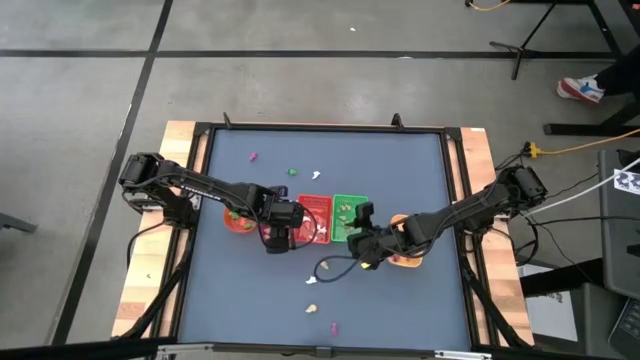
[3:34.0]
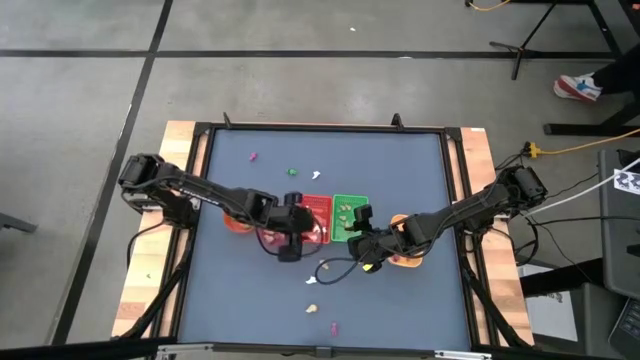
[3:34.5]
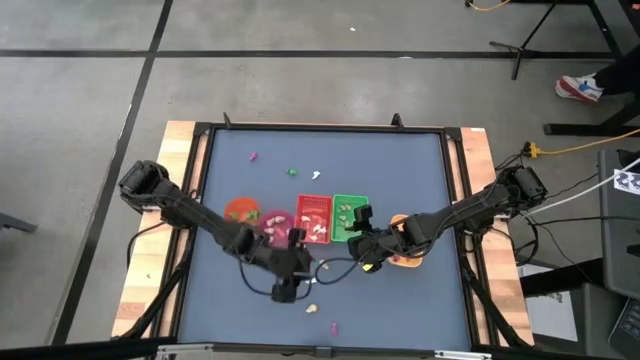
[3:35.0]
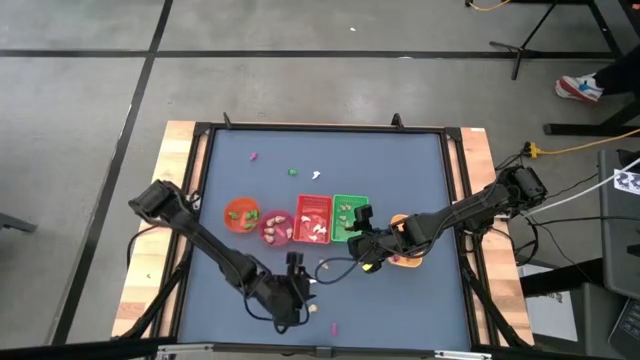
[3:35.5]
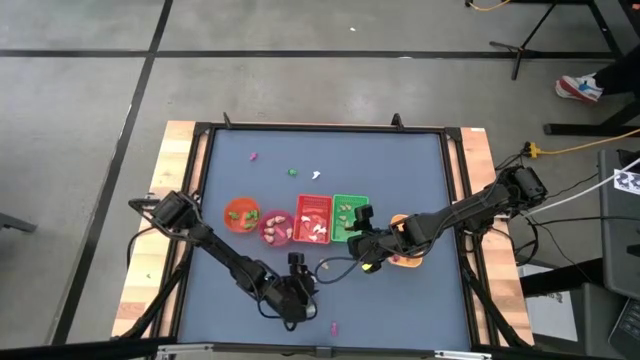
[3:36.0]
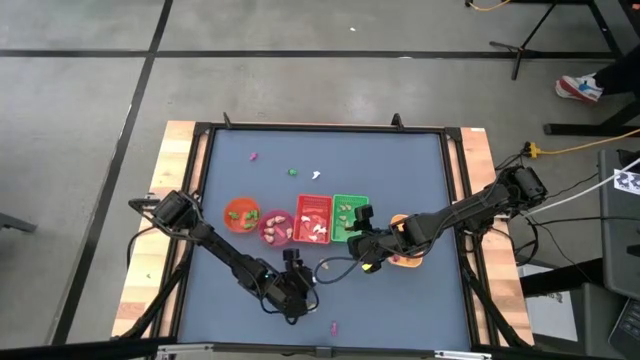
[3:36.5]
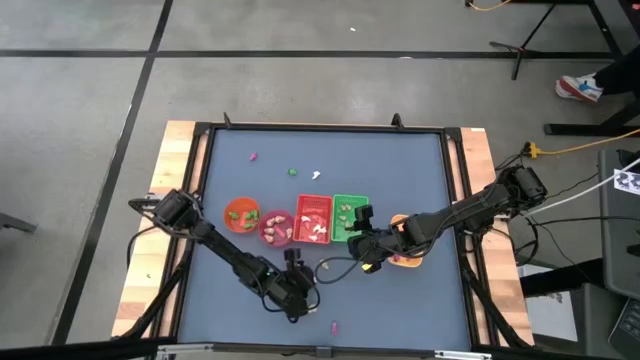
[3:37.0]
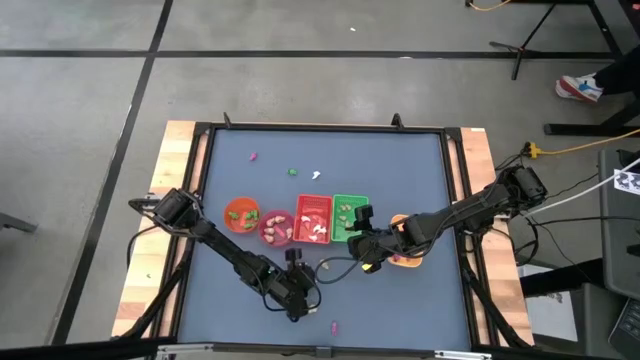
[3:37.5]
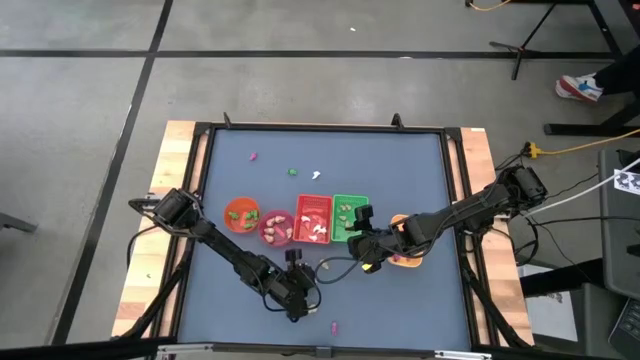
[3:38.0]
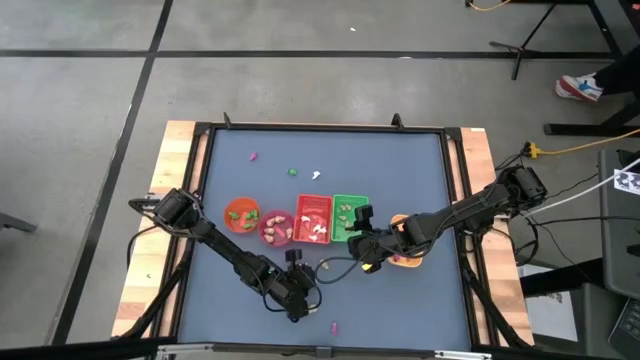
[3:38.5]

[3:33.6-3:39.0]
Task: Sort Halloween decoration
Put the white ghost toy into the red bin

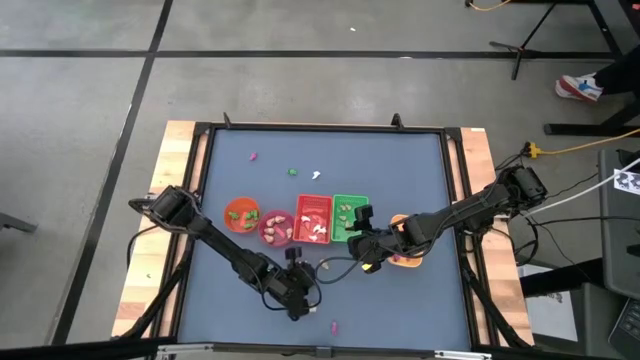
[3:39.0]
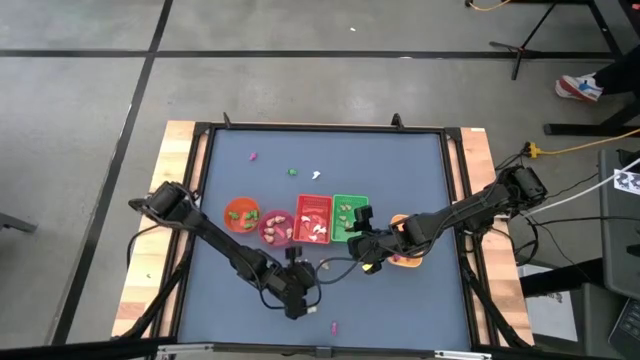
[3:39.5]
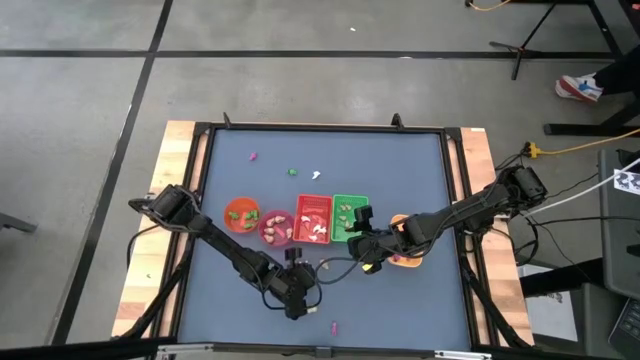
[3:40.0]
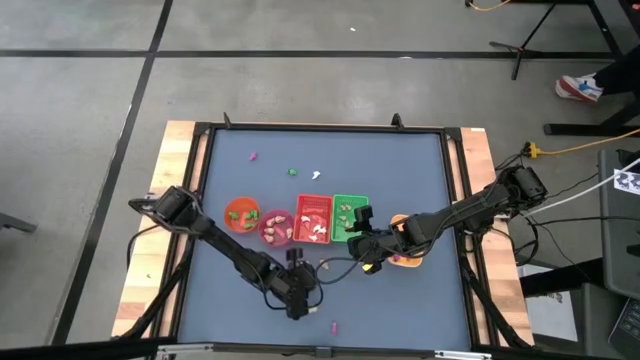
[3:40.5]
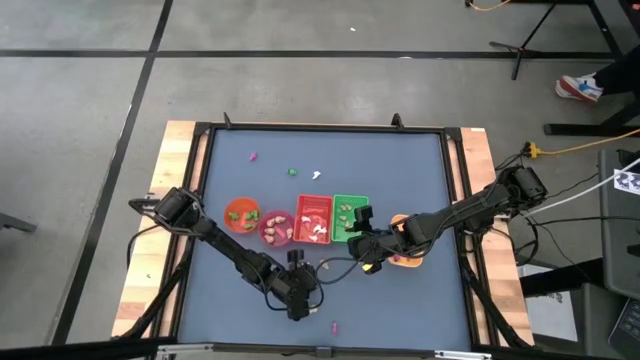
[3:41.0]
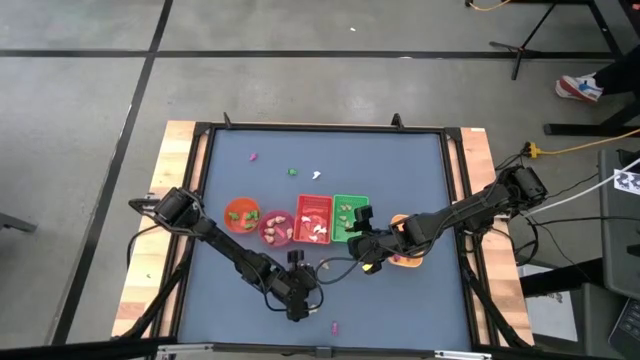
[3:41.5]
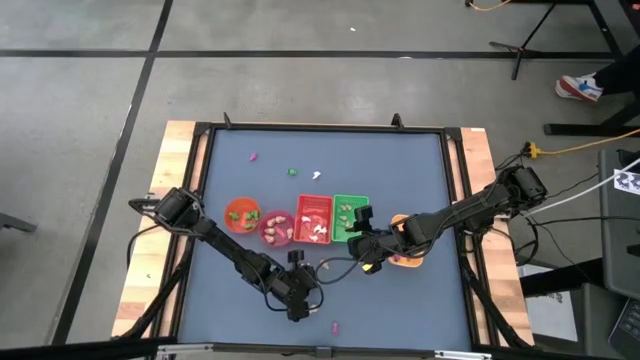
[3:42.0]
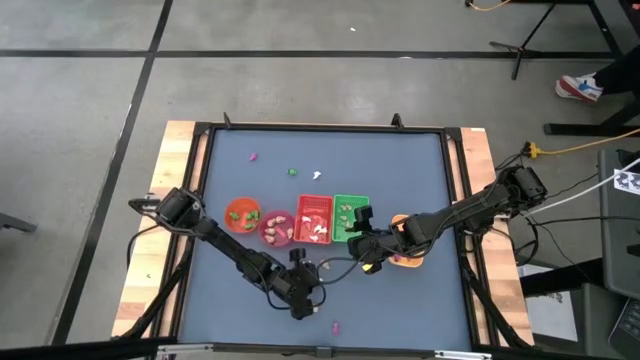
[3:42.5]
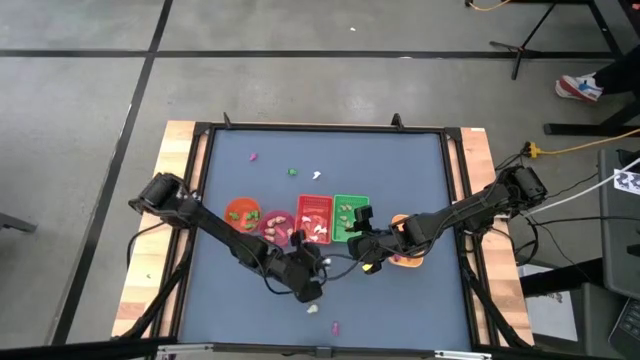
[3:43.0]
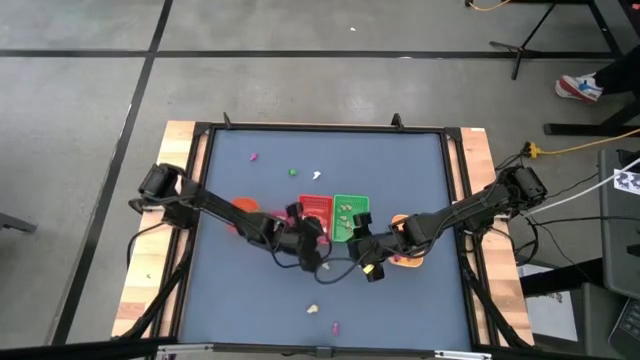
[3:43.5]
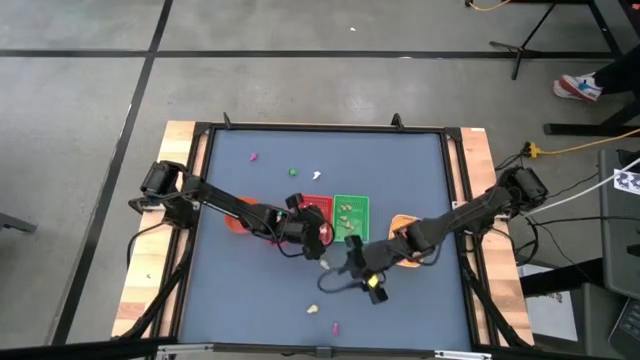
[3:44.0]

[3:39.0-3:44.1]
Put the white ghost toy into the red bin

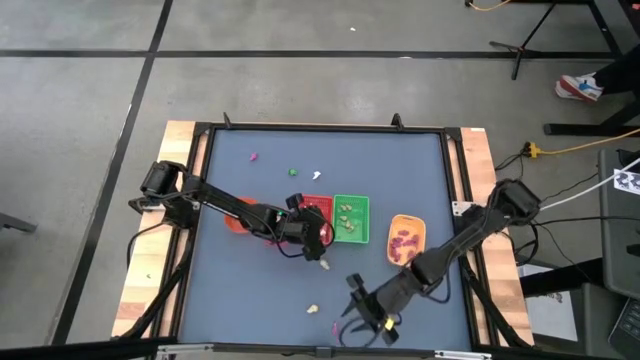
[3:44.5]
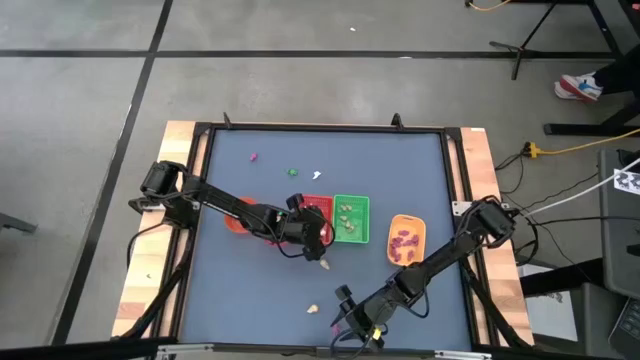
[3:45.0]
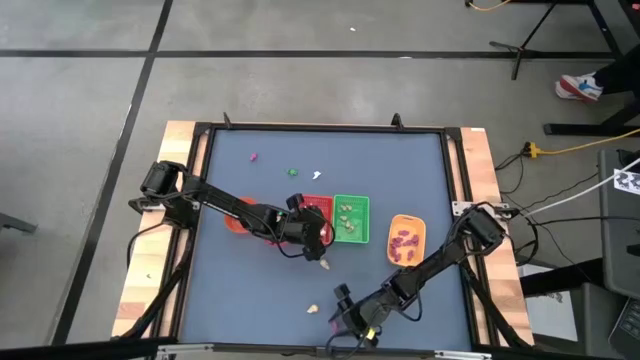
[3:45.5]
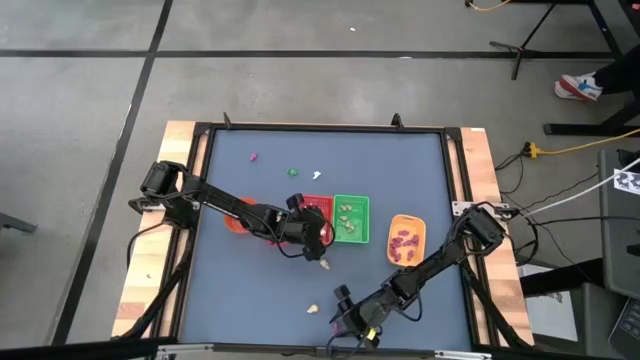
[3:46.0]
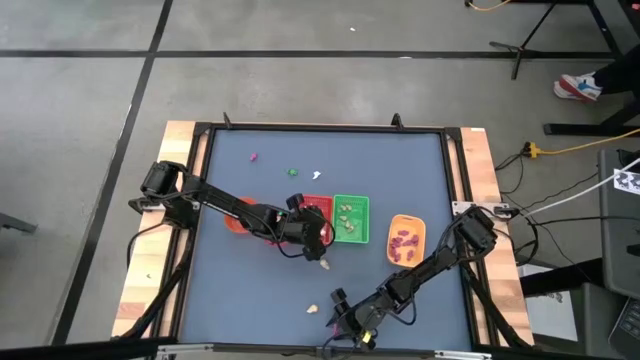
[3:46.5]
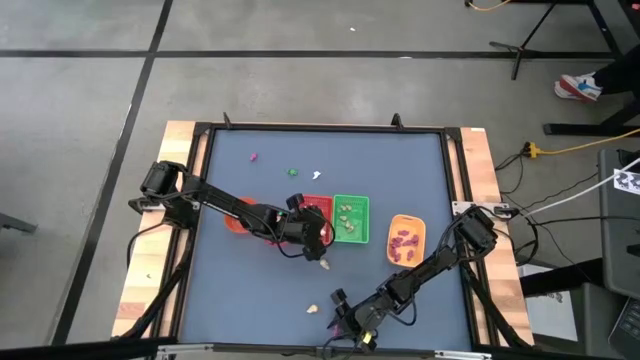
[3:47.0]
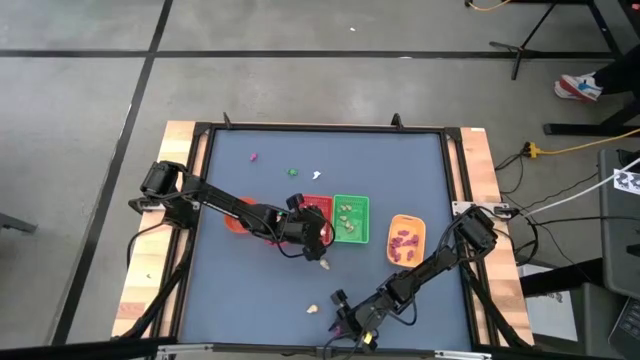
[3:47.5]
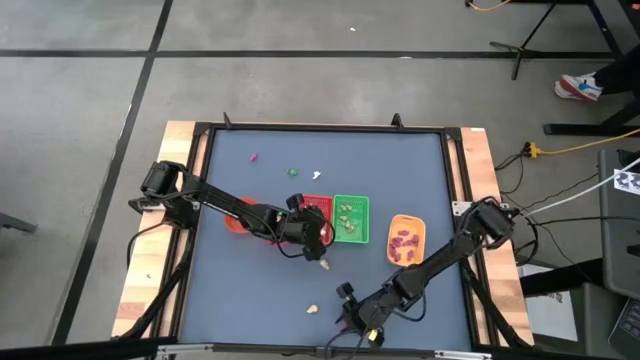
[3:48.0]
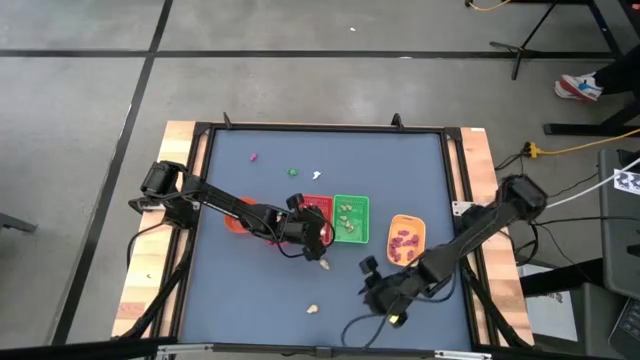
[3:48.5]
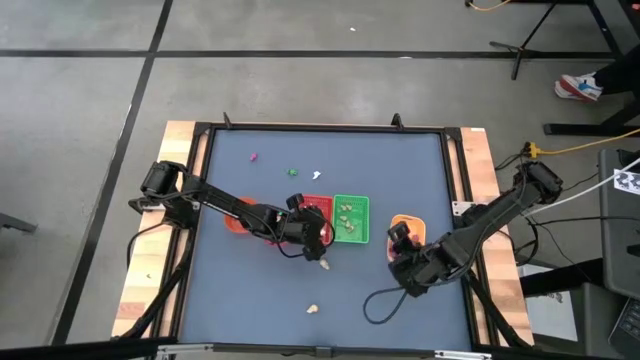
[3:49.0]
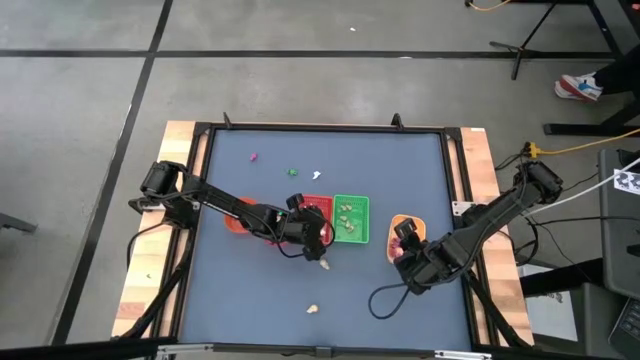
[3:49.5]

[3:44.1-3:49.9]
Put the pink skeleton toy into the yellow bin

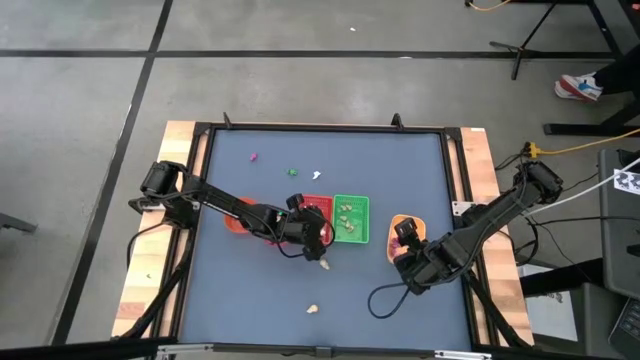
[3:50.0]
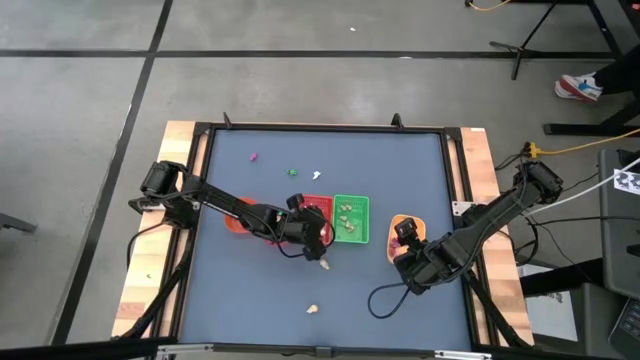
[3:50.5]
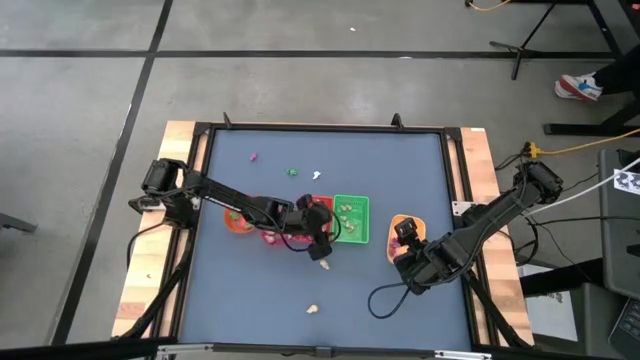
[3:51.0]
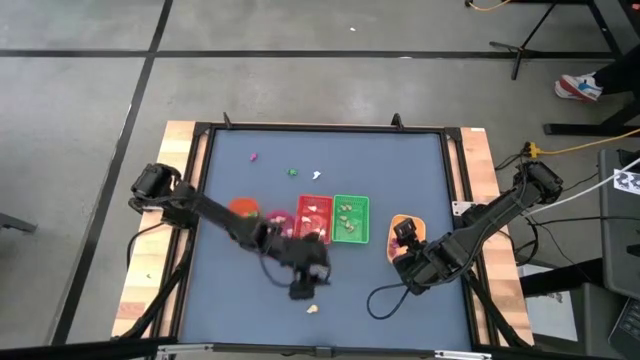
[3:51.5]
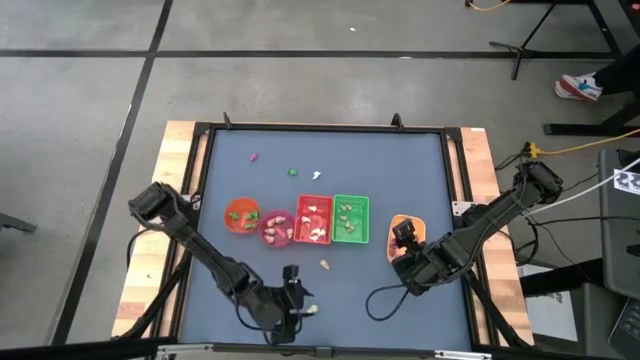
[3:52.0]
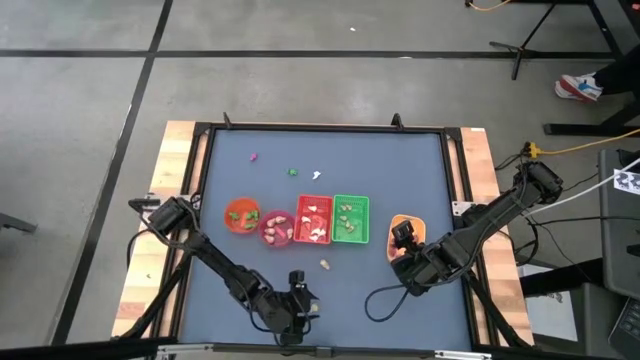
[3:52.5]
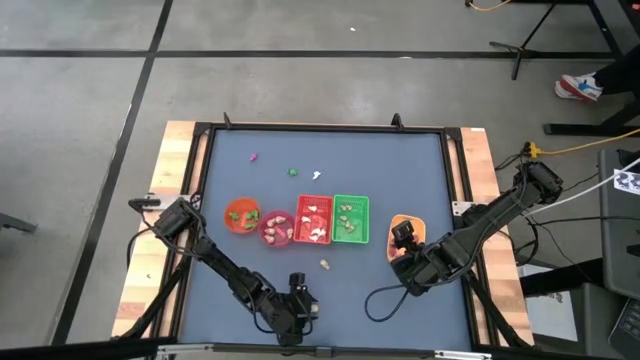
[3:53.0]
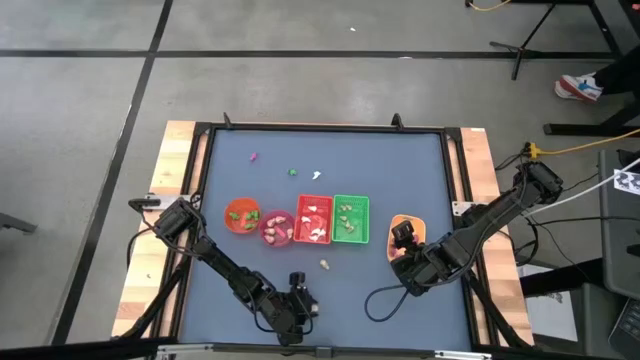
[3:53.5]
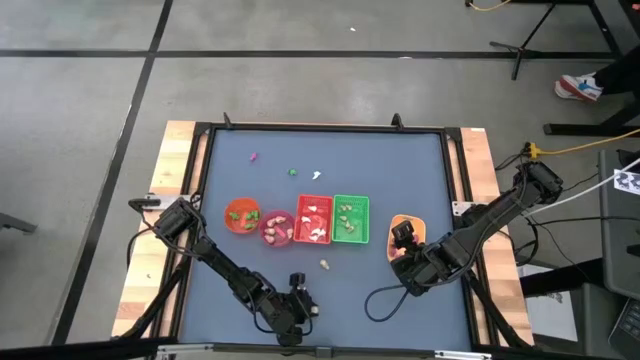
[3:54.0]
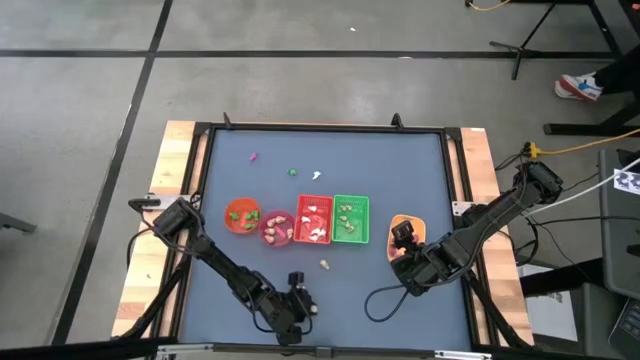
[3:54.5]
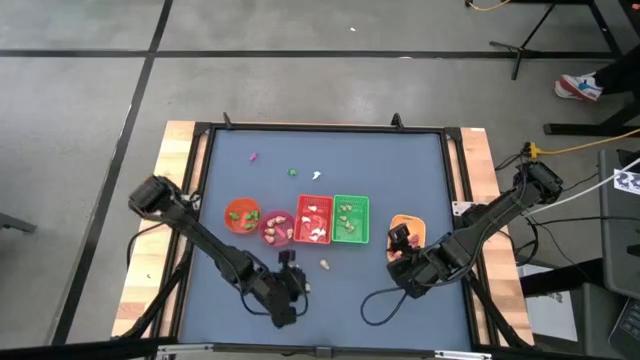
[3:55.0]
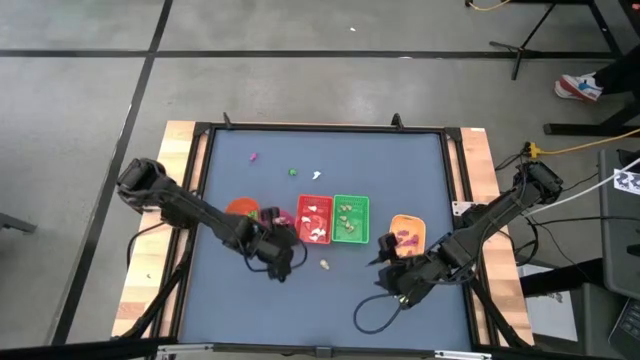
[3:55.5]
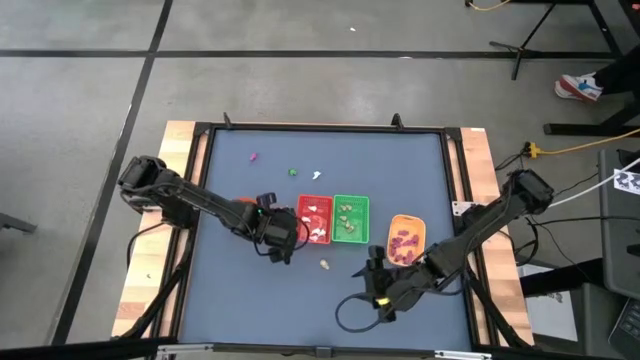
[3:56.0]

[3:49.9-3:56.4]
Put the yellow skull toy into the pink bowl
